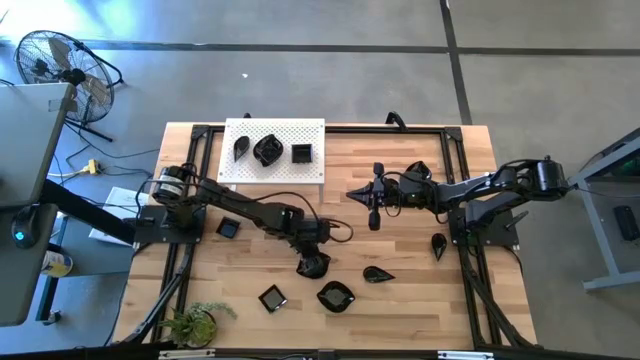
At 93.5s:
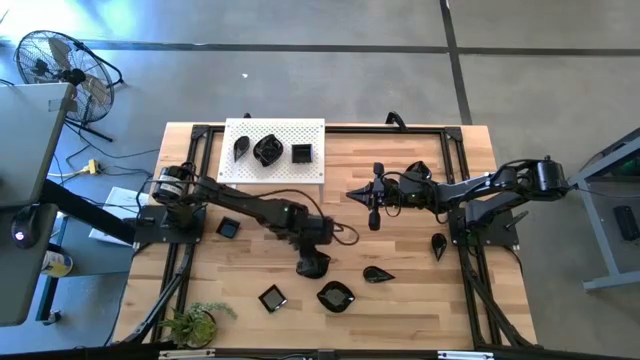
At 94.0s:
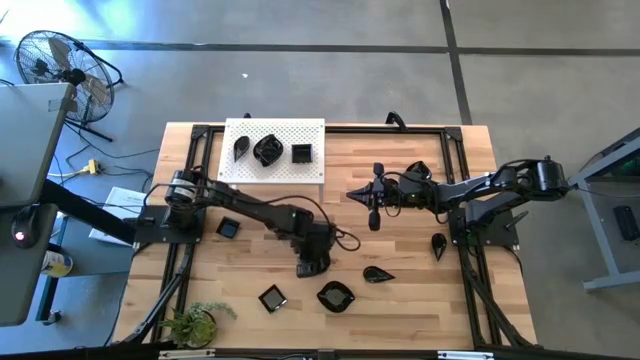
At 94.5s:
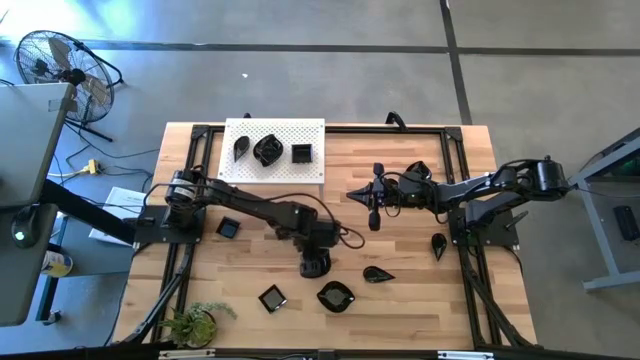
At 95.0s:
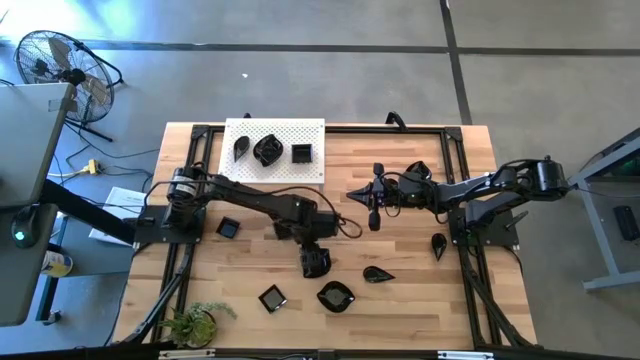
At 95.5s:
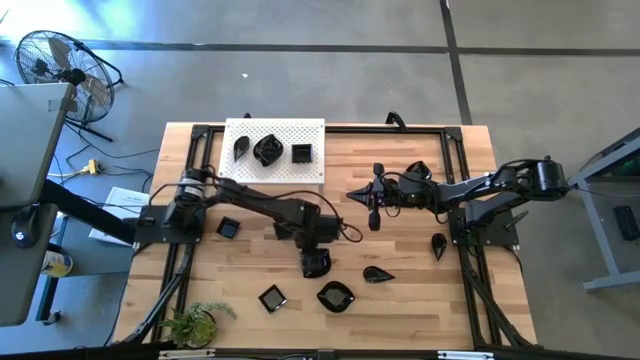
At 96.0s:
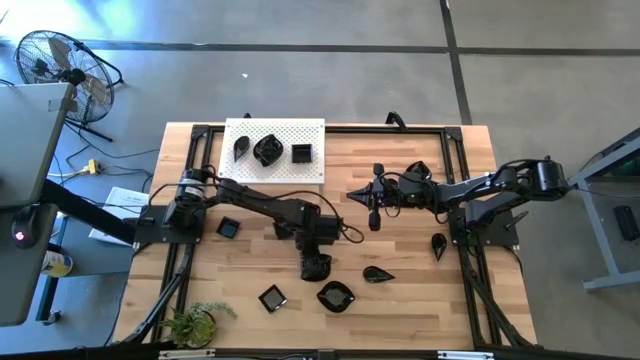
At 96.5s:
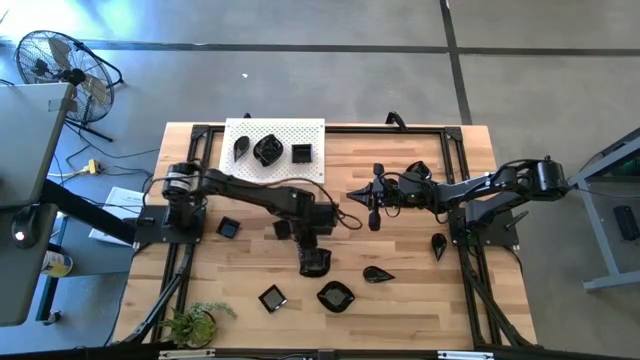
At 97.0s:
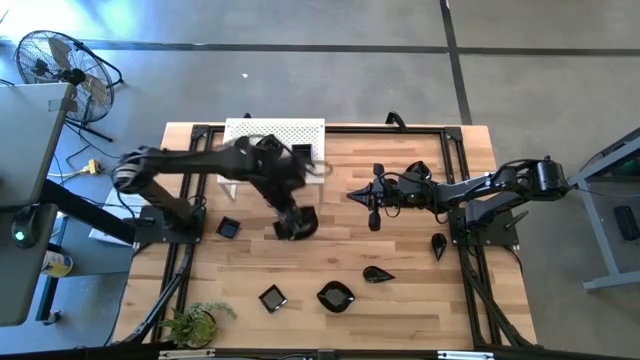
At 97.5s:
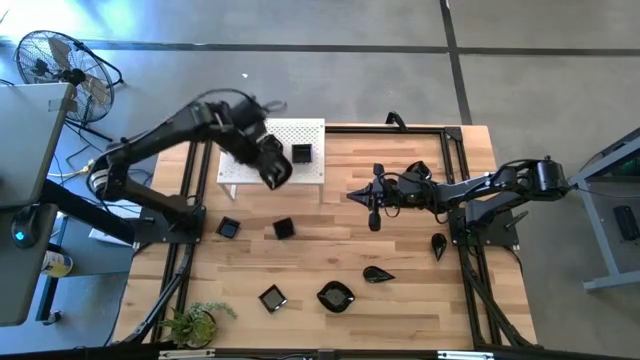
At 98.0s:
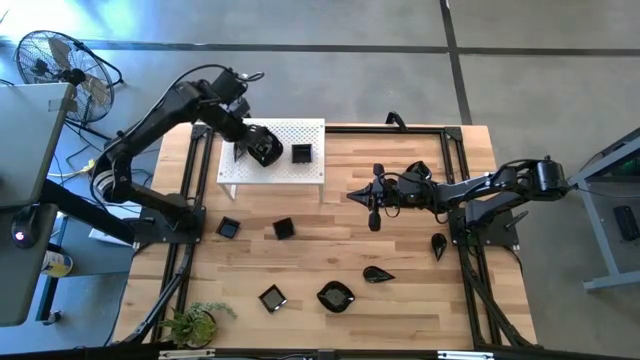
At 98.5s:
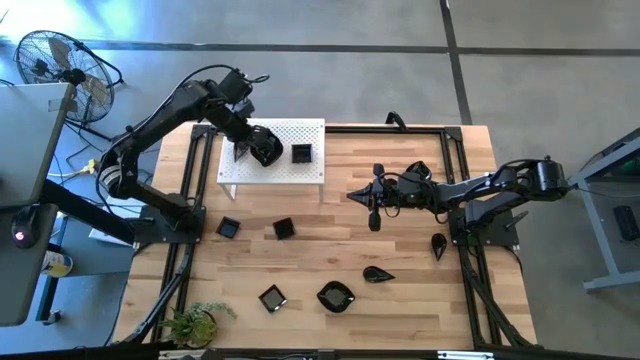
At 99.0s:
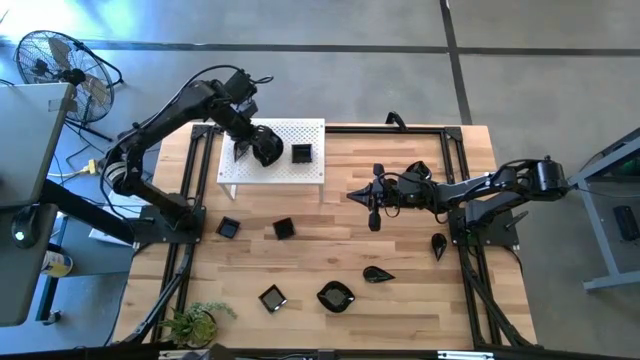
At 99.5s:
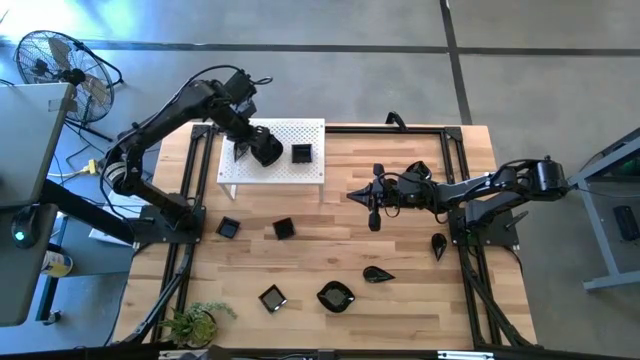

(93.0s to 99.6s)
Task: Pick & Place Mini shaped plates
Stack the leaf-shaped plate on top of the leaf-shaped plate on the shelf

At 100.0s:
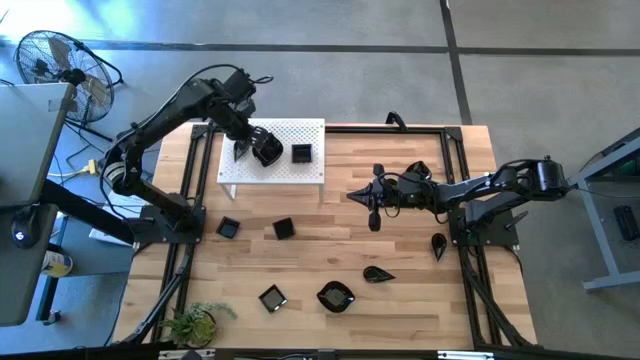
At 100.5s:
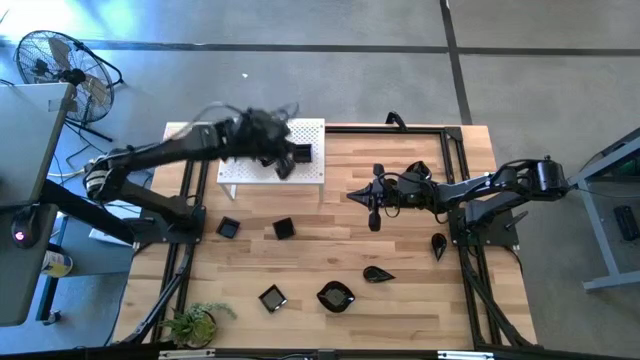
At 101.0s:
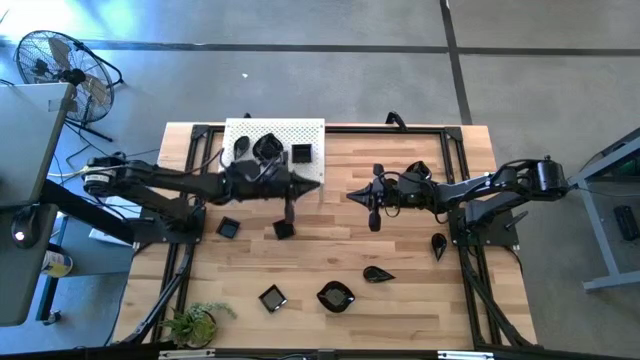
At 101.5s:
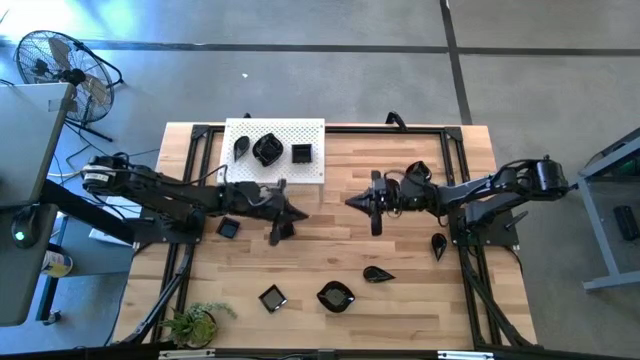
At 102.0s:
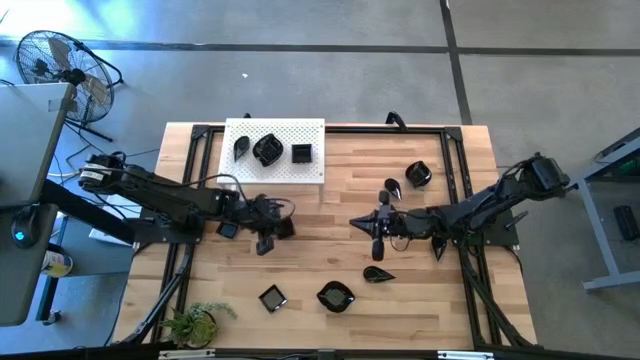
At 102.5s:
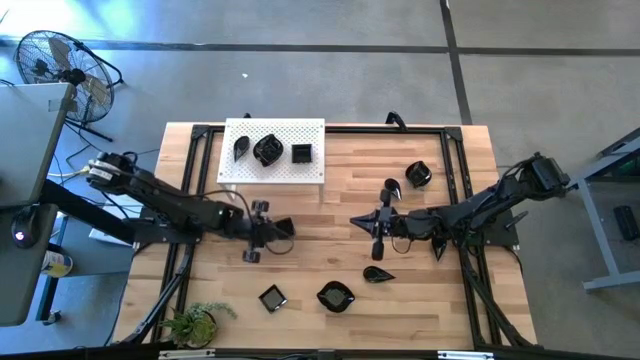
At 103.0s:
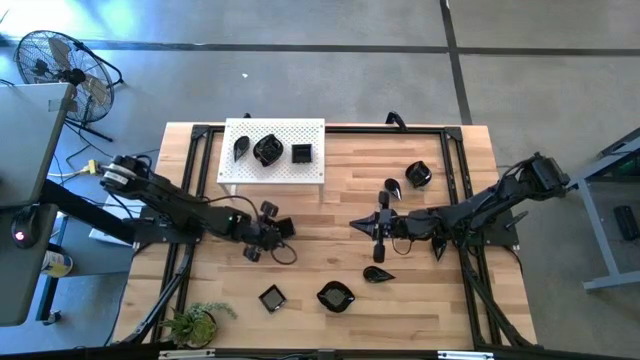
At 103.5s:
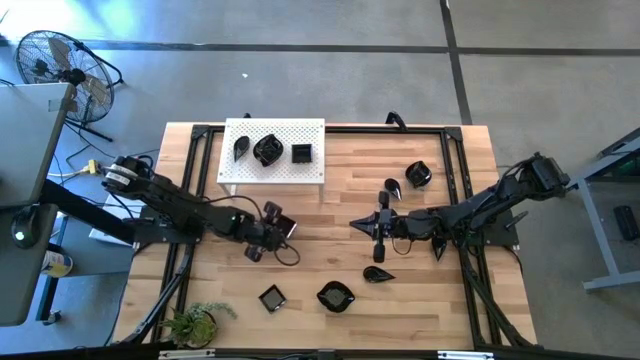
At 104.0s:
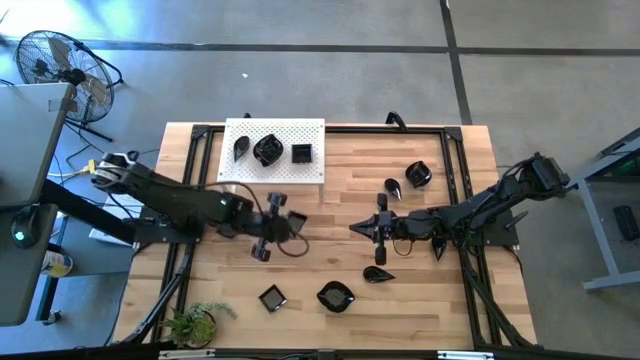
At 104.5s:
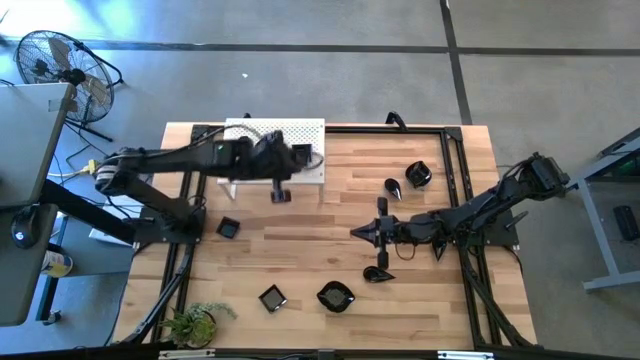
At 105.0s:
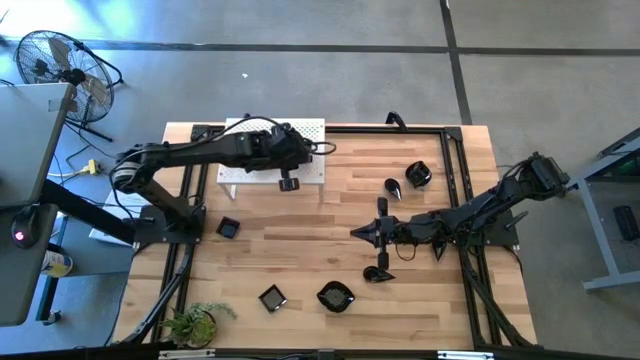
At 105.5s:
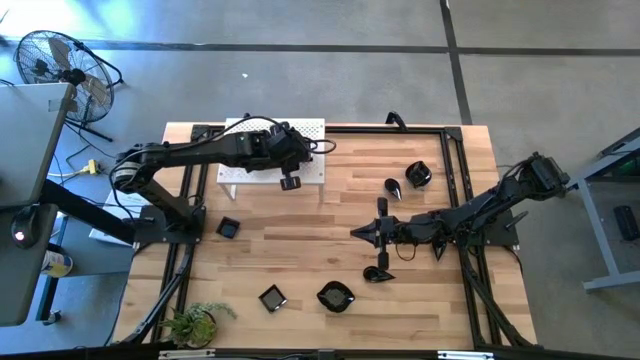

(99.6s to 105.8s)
Stack the square plate on top of the square plate on the shelf

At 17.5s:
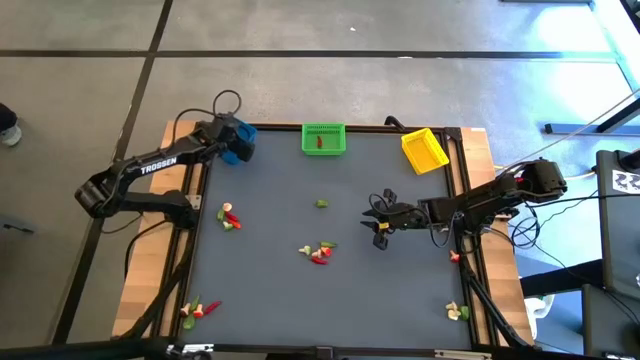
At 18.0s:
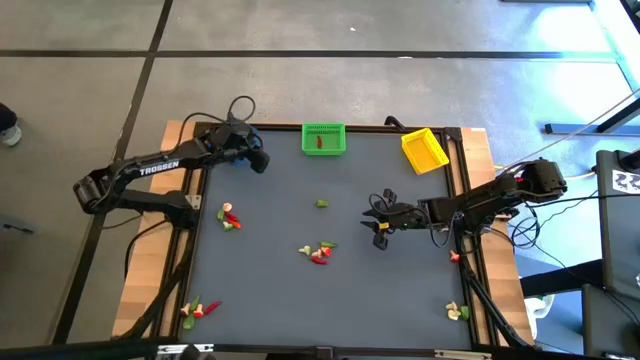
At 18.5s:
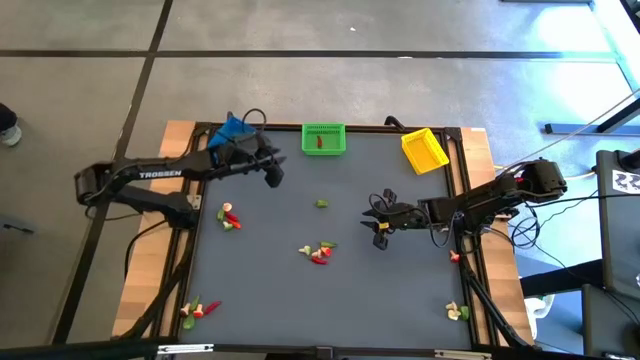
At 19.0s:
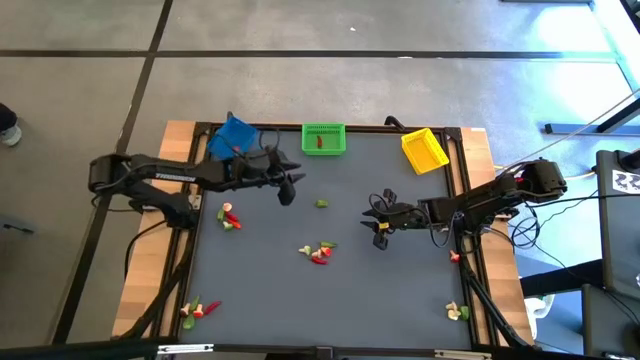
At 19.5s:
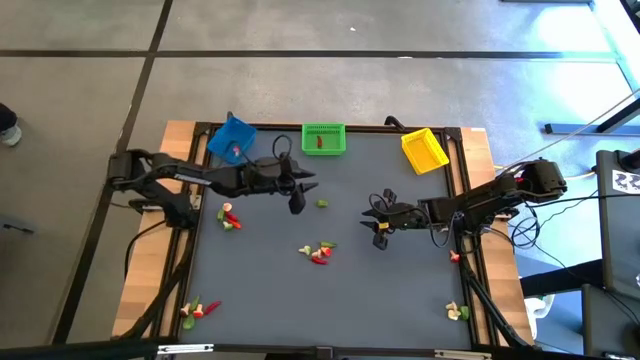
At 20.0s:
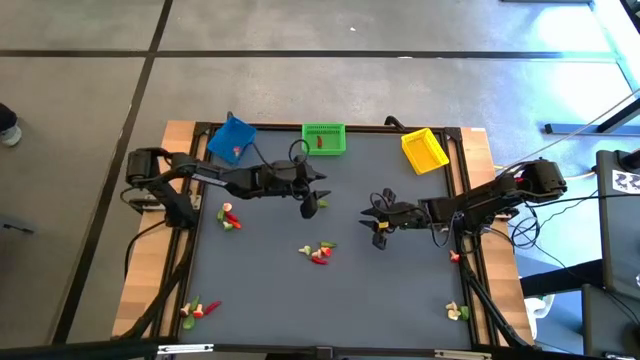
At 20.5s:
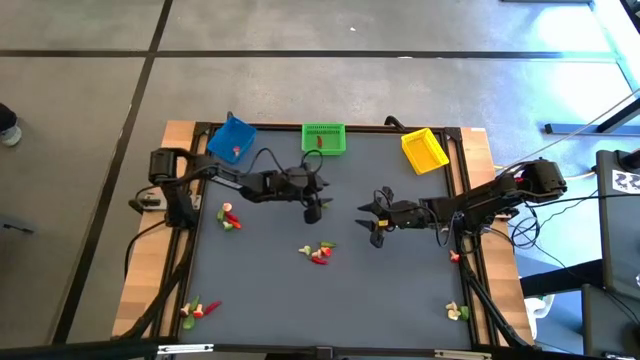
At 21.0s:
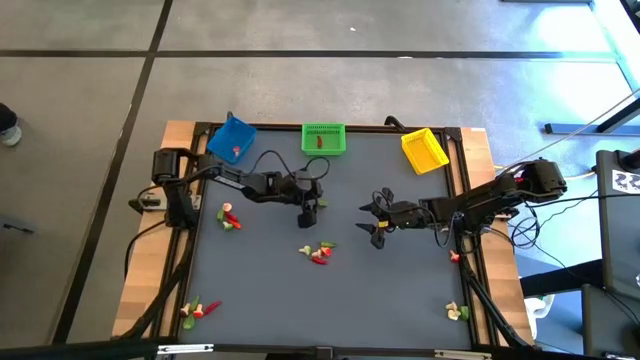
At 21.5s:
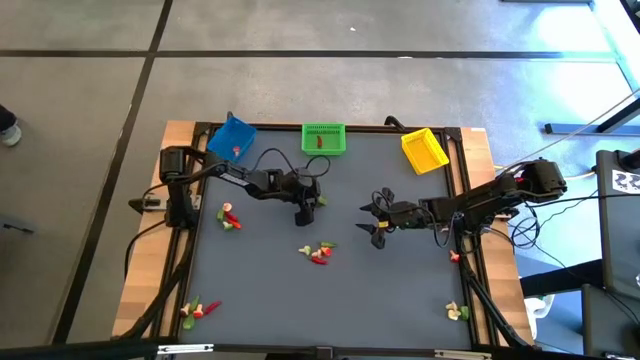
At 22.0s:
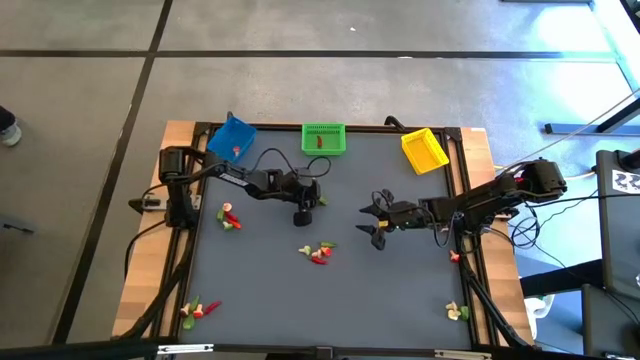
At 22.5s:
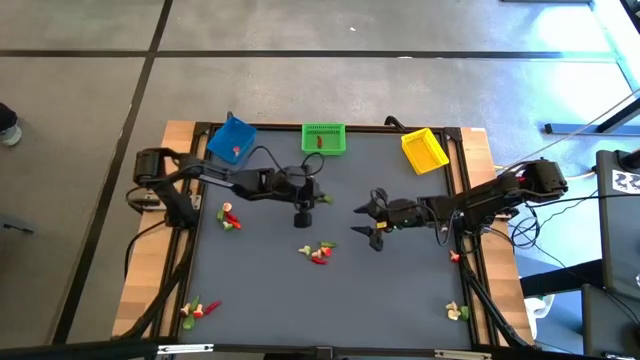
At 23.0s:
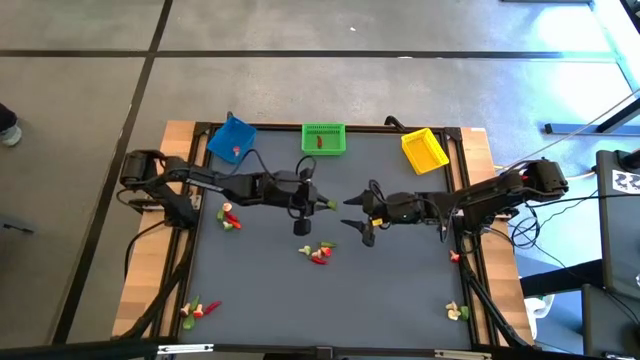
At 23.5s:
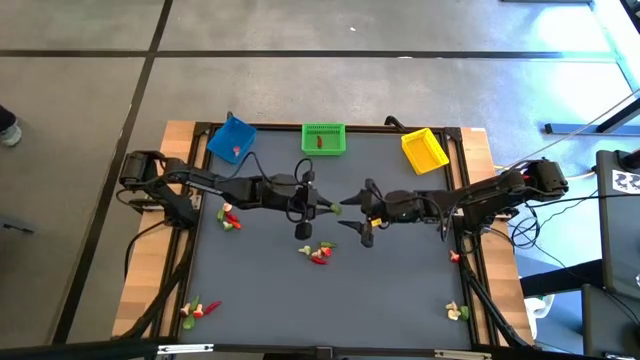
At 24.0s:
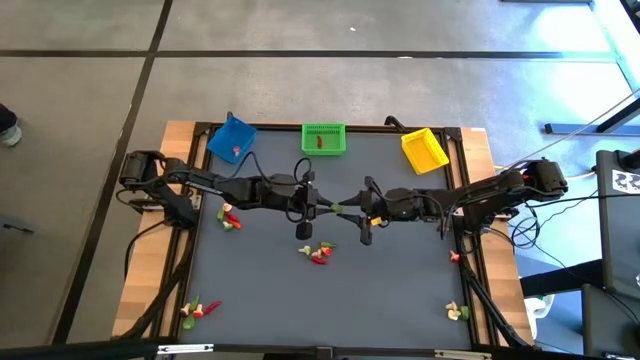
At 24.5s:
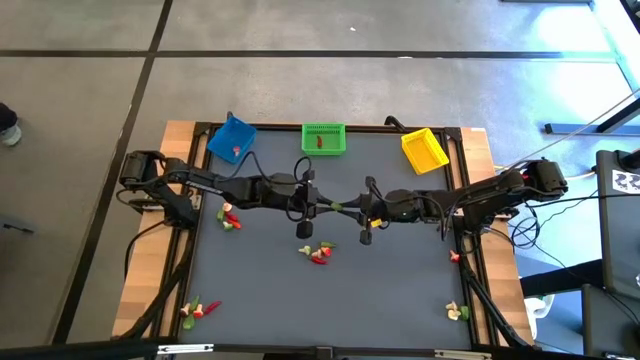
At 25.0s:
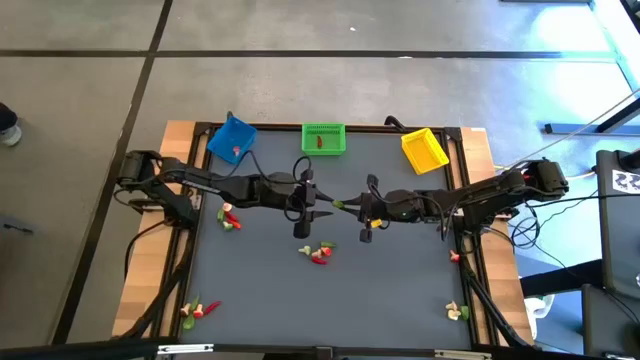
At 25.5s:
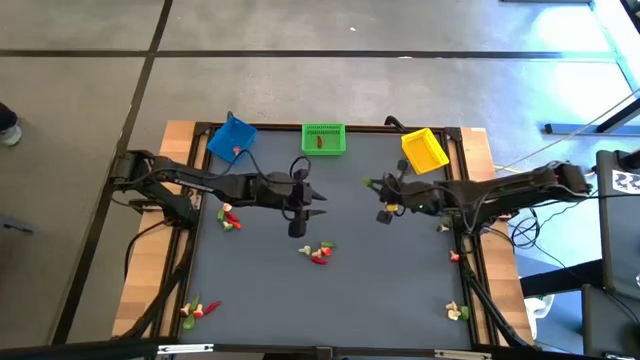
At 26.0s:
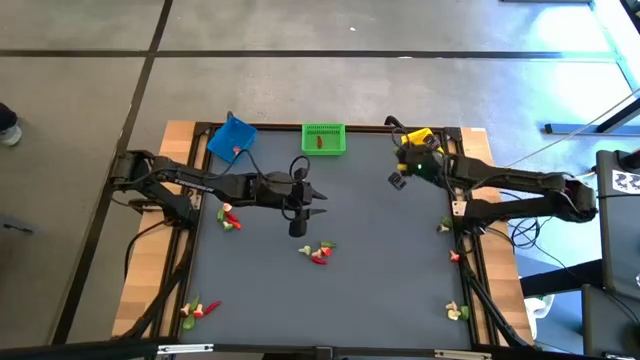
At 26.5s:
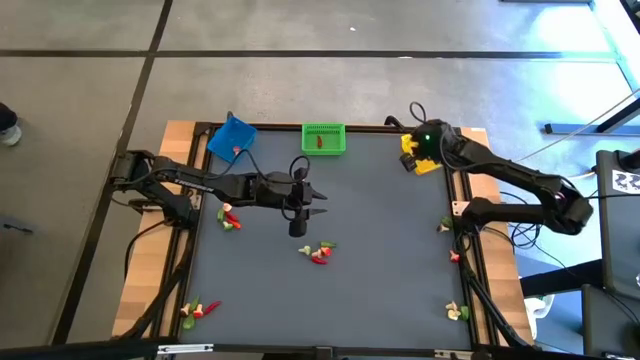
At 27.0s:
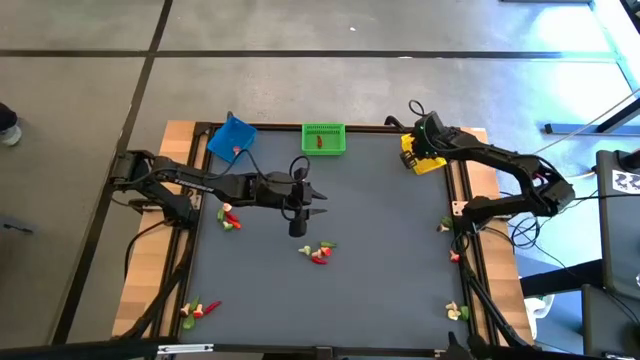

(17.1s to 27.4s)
Task: Sort produce into baskets
Put the green chili pepper into the yellow bin
